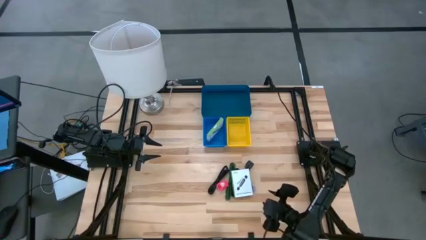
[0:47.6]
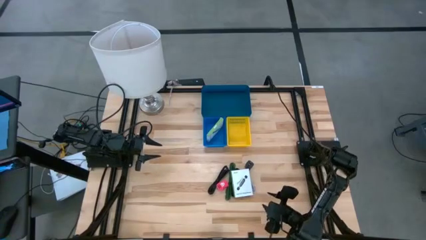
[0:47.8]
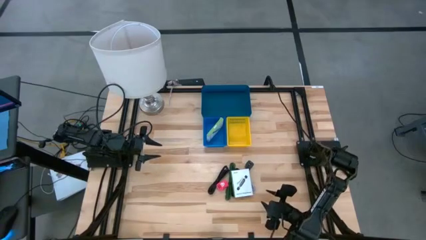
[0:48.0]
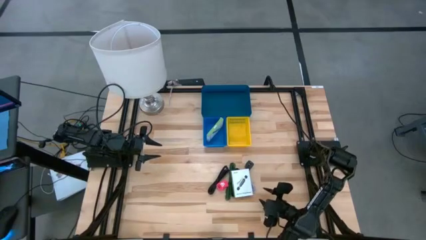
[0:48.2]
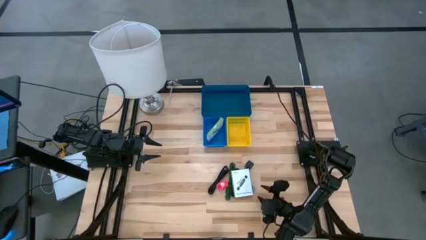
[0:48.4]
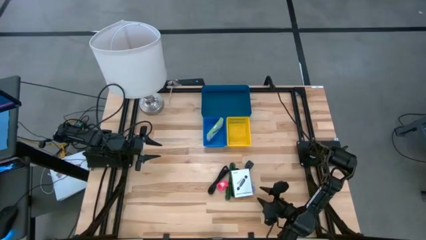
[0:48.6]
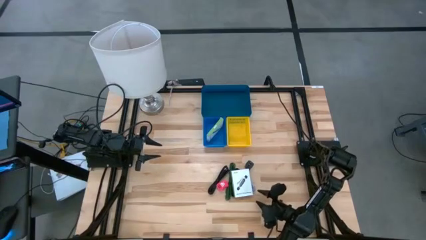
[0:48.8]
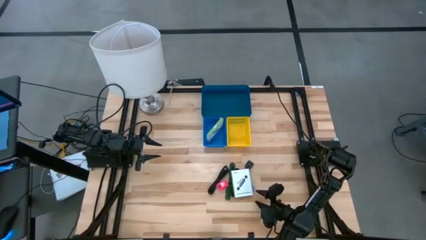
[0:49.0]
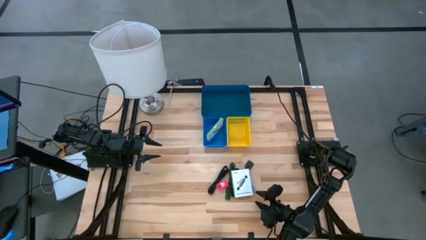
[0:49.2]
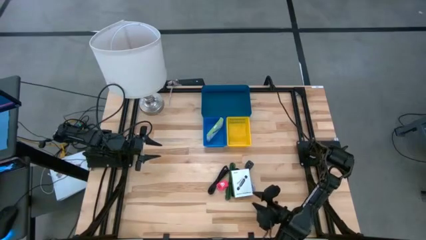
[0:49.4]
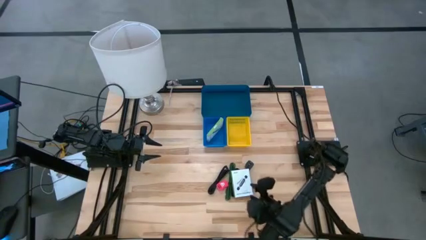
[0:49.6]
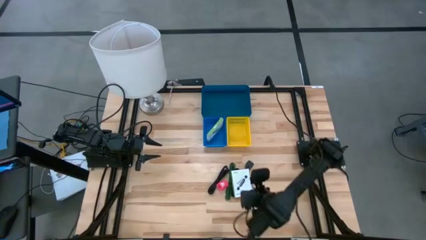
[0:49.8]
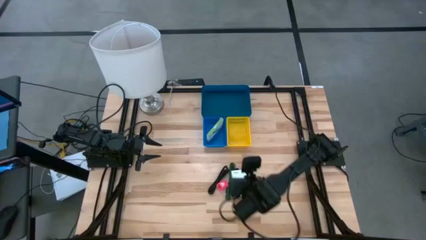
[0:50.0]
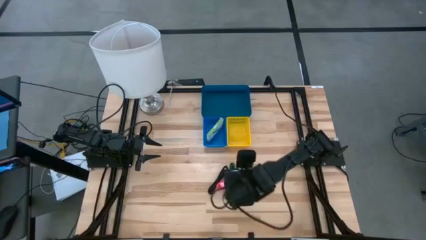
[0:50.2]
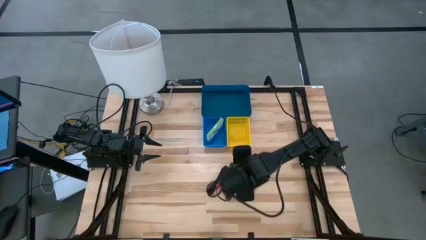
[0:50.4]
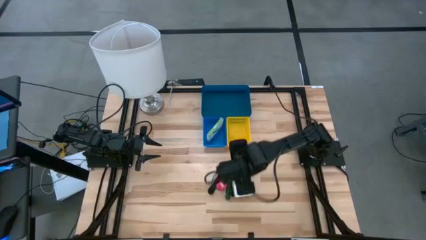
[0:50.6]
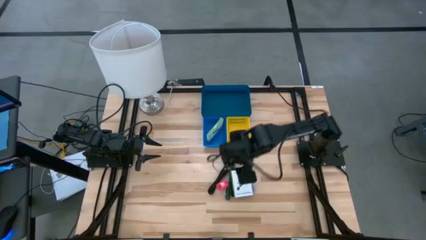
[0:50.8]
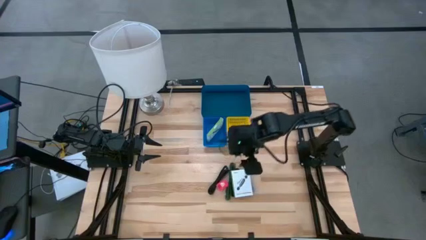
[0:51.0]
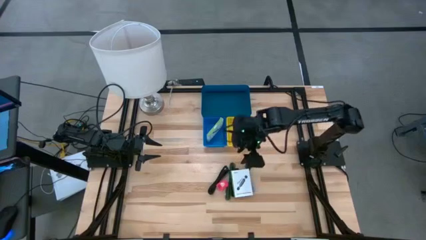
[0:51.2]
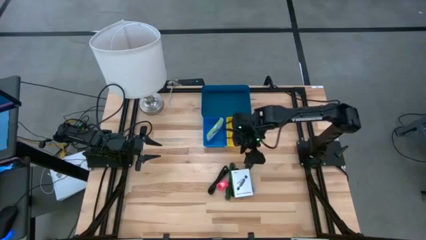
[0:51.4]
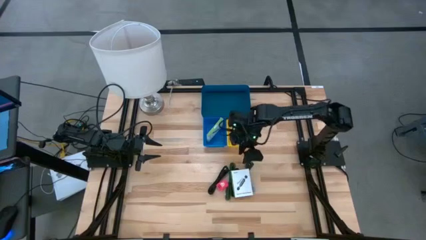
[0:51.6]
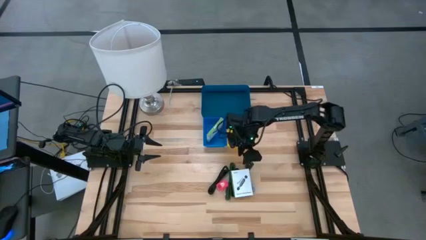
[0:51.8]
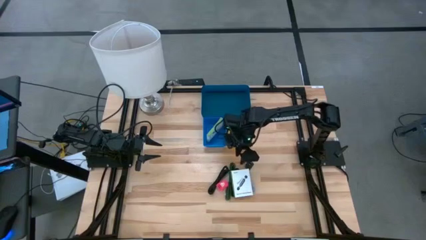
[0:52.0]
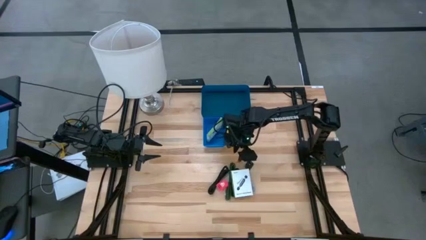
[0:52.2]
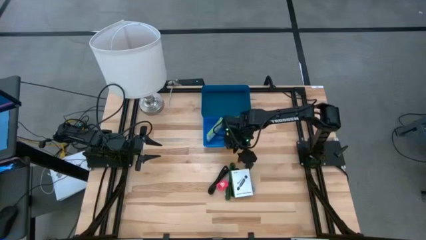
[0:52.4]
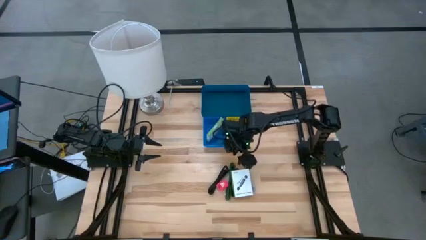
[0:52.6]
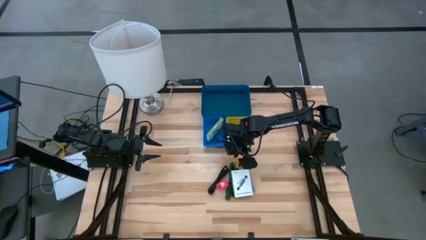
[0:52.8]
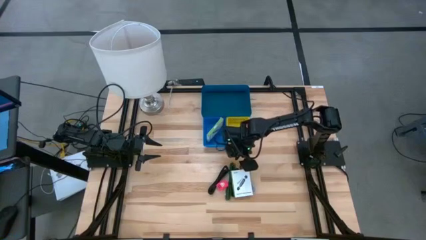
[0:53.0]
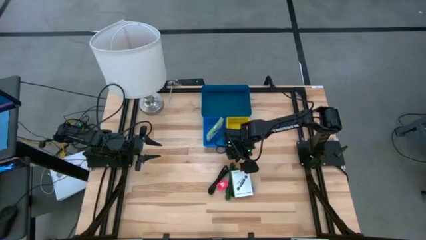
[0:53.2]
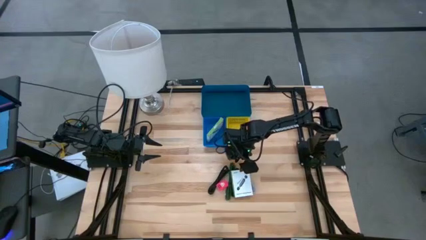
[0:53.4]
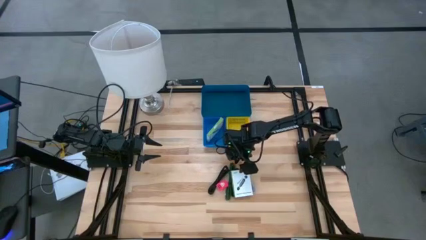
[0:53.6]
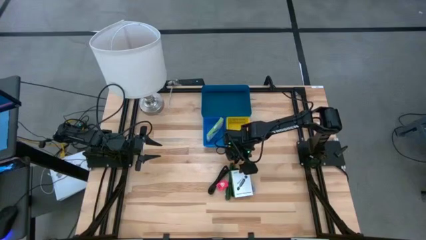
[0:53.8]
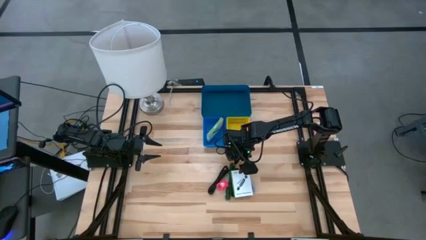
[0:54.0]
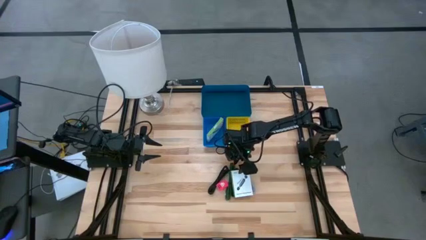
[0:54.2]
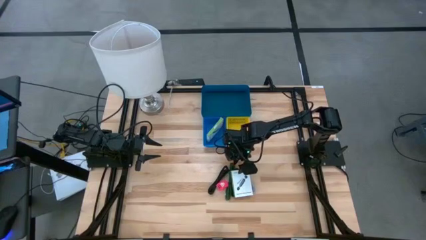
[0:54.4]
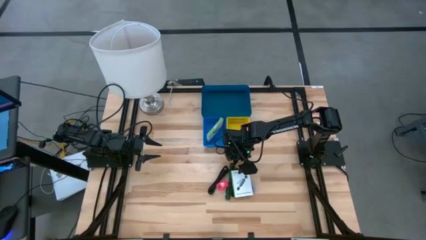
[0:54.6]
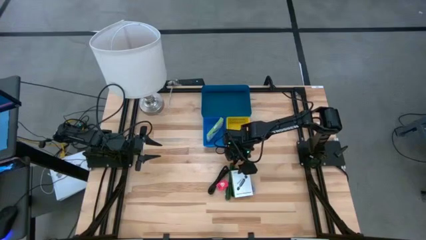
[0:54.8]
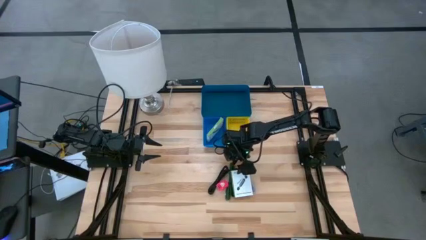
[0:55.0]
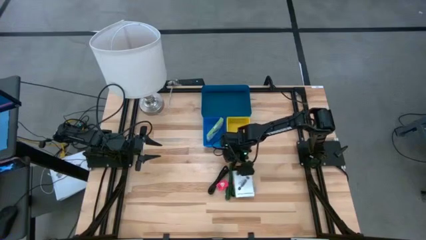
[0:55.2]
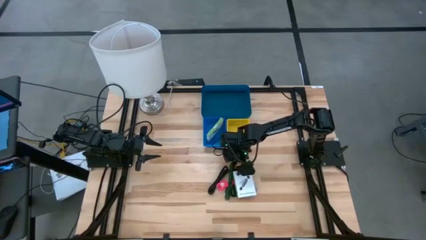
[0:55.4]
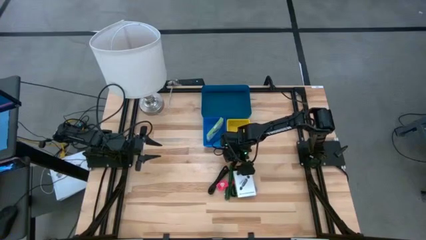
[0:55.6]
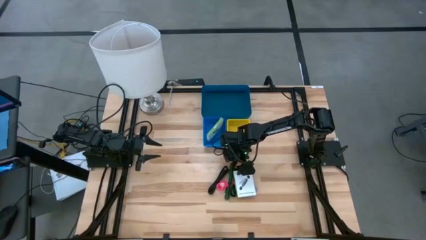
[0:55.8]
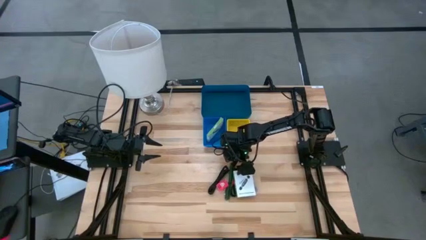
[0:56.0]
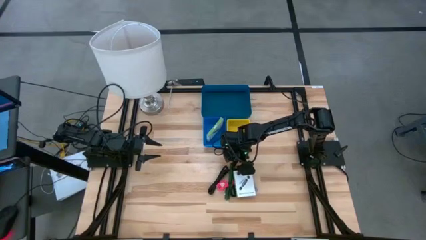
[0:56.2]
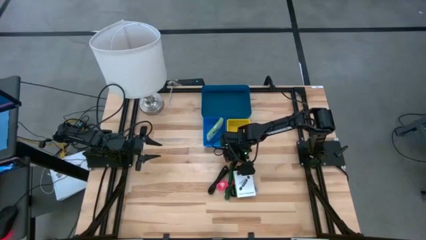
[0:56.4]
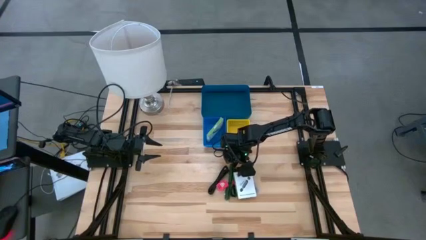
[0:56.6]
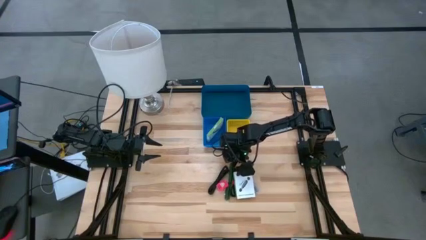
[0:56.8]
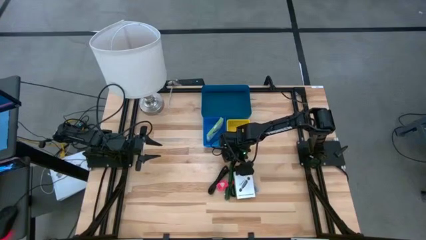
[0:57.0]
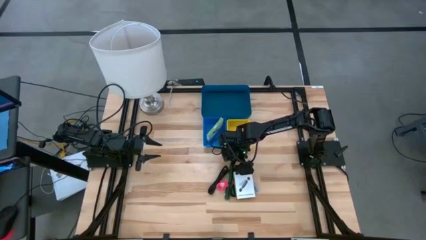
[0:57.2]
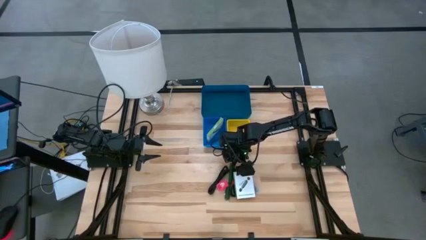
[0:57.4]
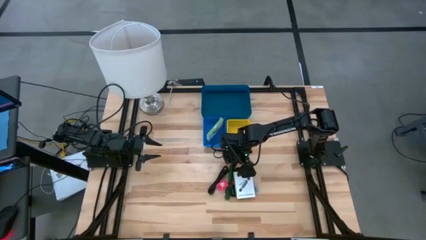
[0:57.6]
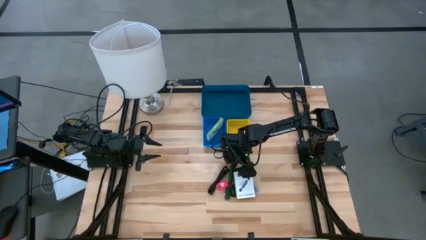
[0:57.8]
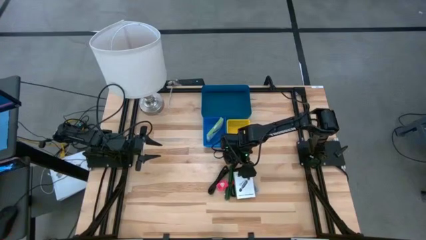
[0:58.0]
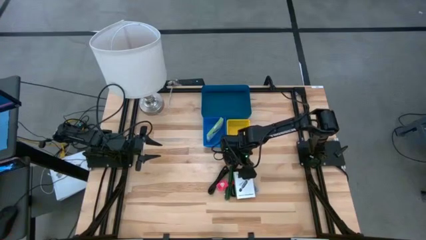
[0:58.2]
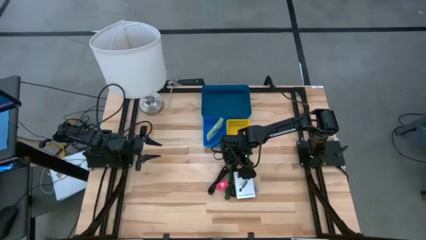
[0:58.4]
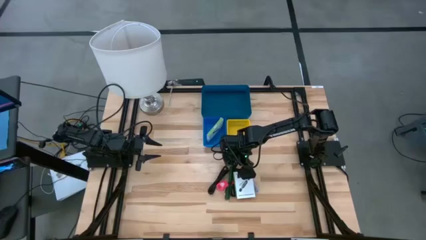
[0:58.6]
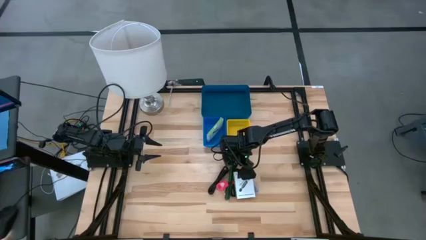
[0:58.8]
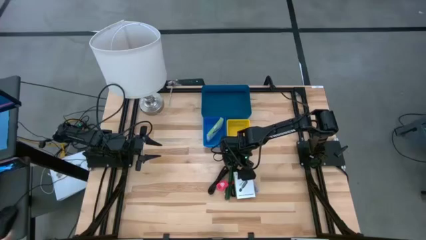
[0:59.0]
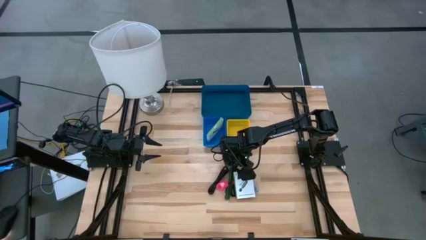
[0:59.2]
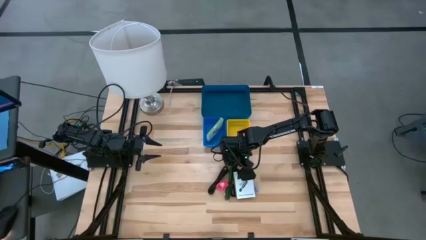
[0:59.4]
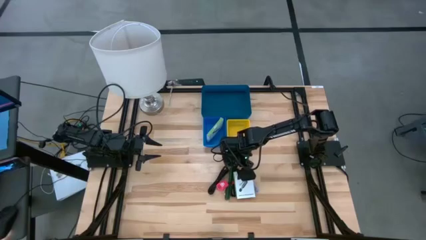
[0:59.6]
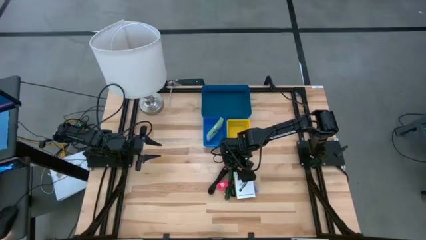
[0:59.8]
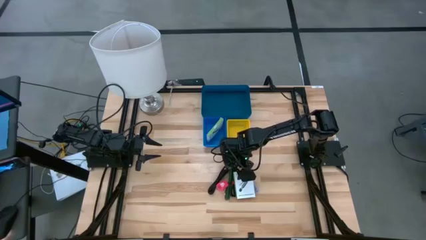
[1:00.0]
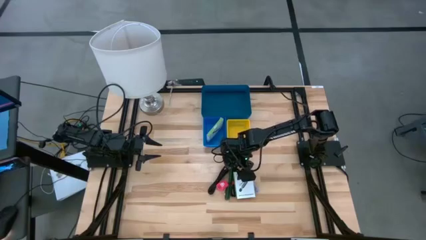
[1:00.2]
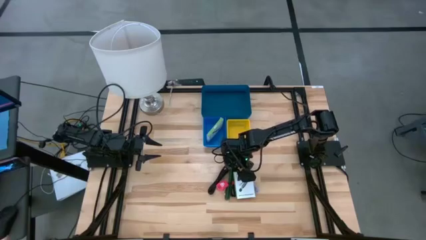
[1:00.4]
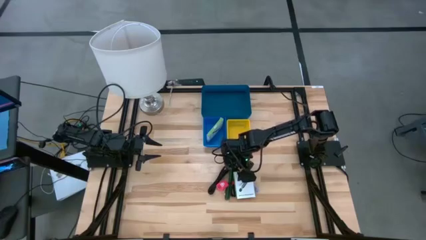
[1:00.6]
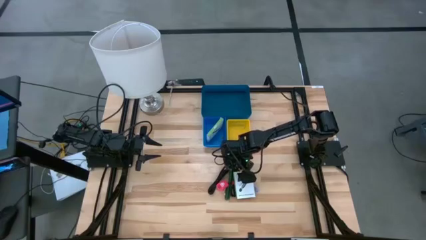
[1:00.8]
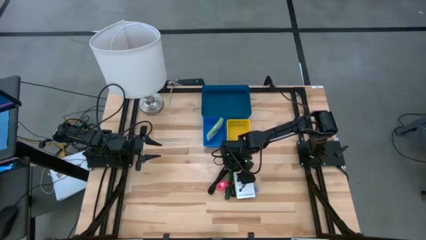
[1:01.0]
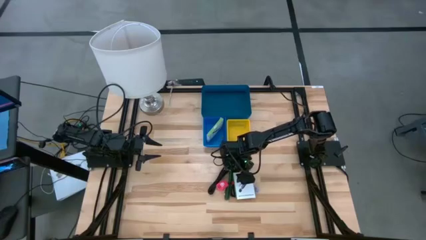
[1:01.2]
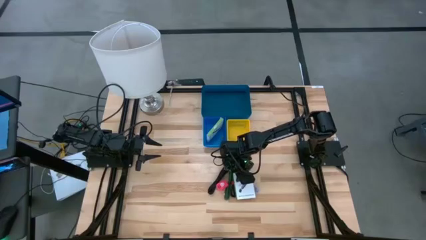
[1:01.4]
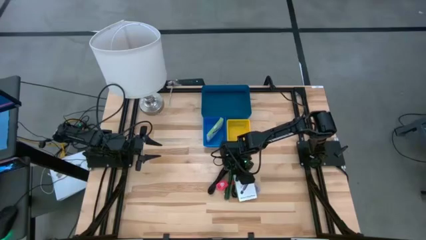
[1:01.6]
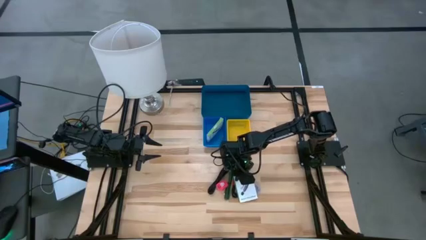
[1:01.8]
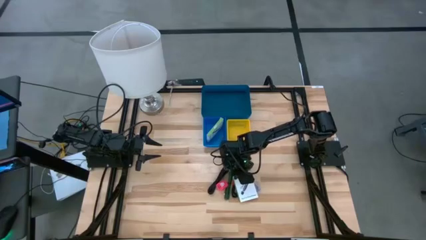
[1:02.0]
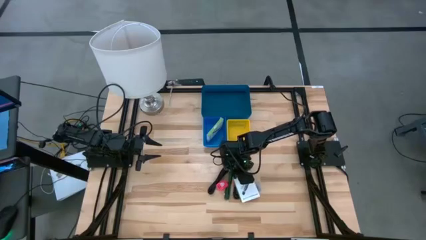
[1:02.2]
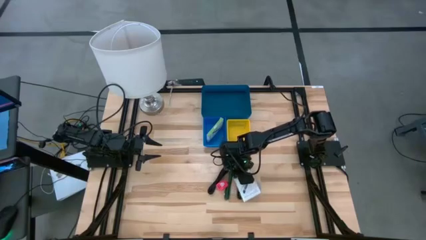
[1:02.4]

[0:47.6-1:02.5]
Task: Pick and place items into bin
Put the card reader box into the small blue bin

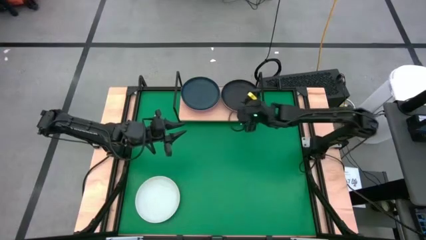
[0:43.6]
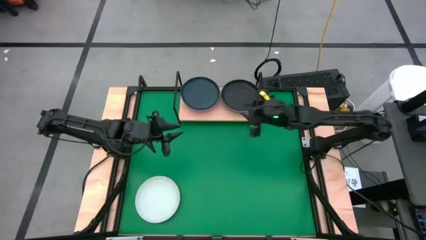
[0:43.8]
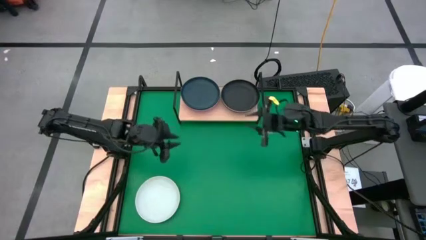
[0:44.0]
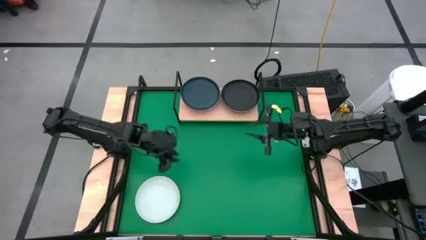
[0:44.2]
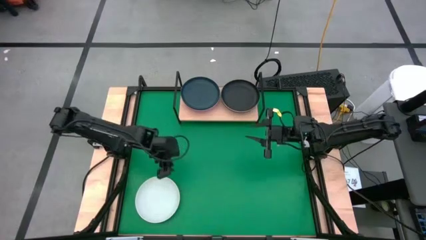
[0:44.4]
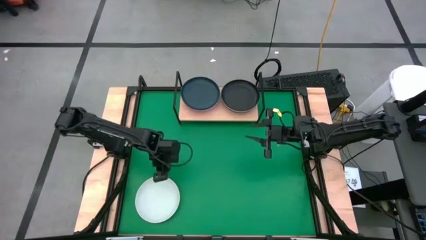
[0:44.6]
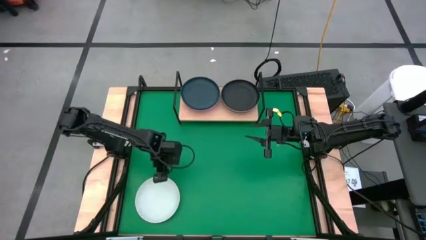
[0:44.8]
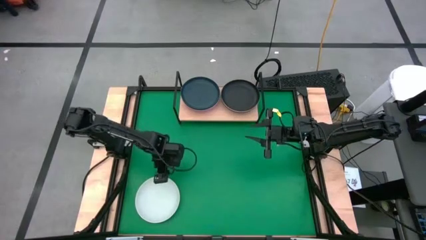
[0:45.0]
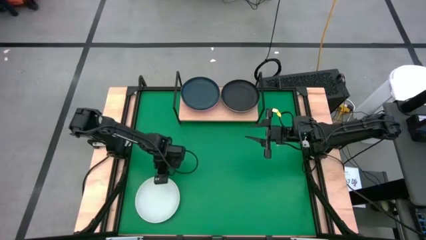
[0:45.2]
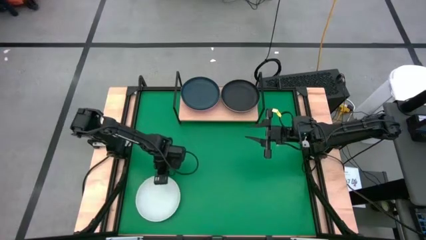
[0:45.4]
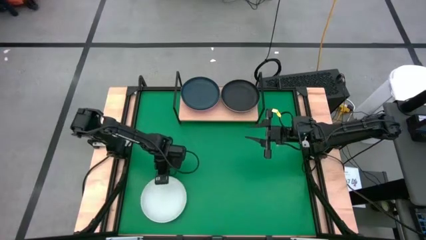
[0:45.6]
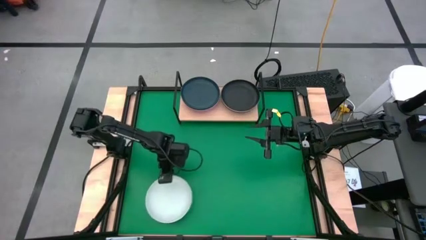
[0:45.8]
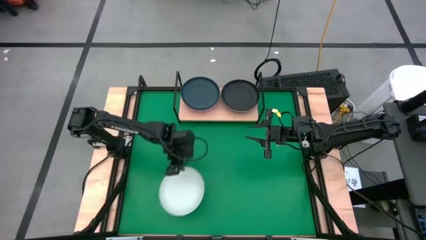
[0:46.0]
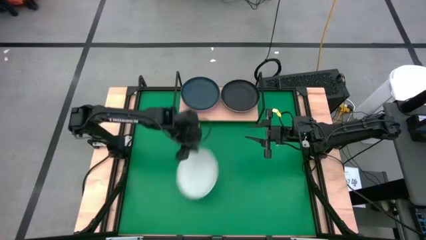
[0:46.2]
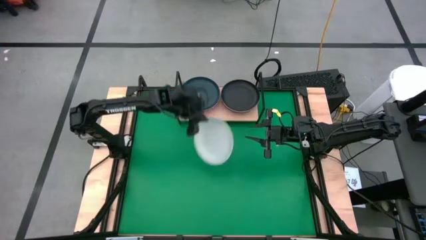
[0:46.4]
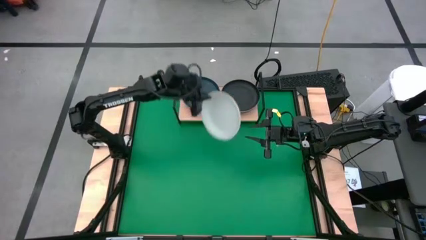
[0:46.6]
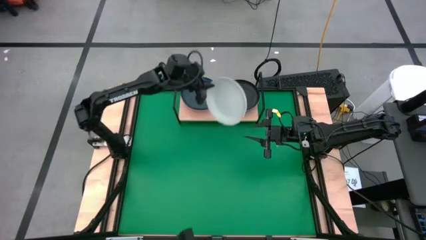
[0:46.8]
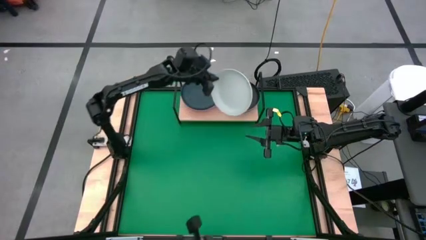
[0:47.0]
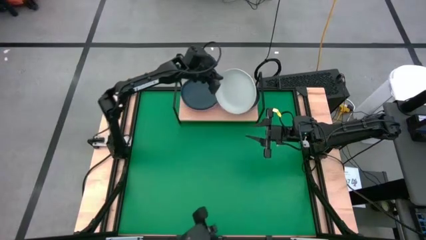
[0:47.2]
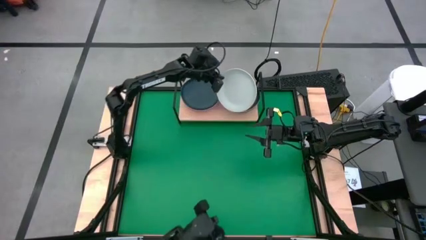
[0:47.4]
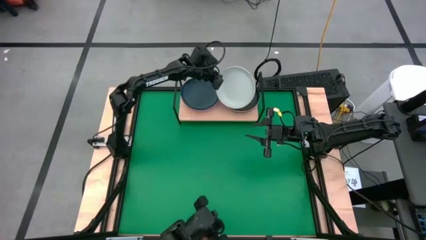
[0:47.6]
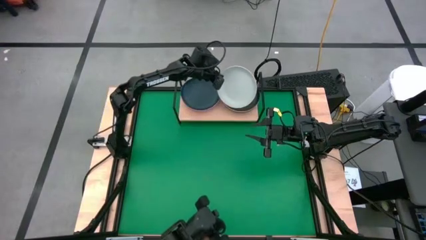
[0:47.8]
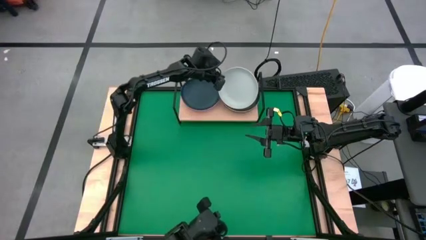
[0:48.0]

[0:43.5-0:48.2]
Task: Place and stack plates onto a shelf
Stack the white plate on top of the black plate on the shelf
